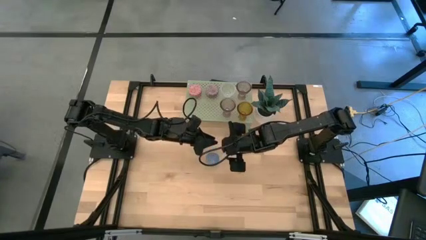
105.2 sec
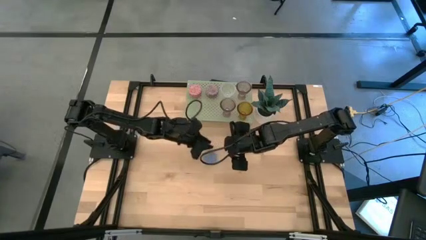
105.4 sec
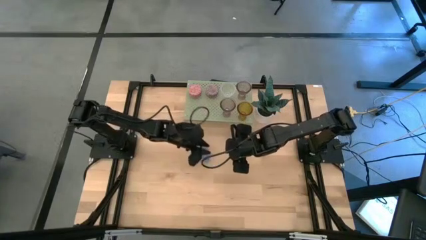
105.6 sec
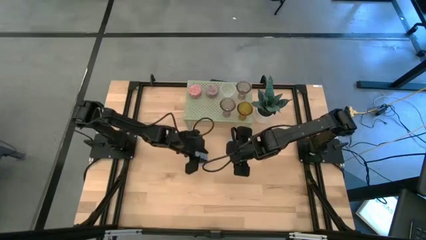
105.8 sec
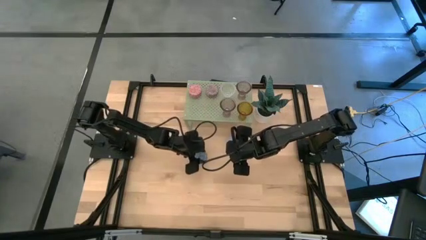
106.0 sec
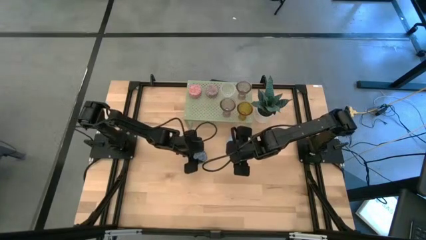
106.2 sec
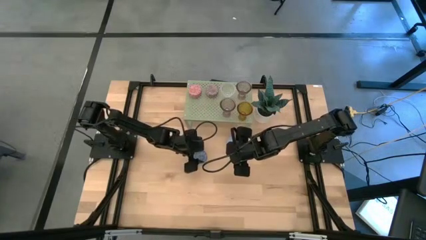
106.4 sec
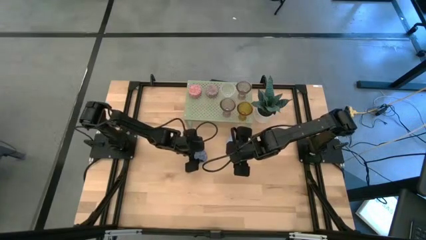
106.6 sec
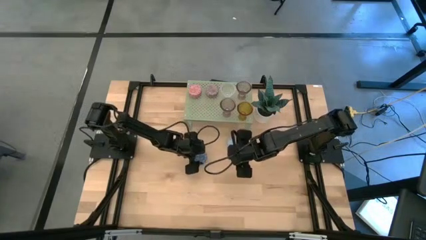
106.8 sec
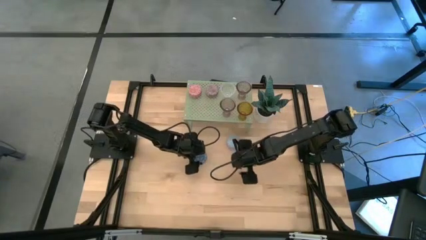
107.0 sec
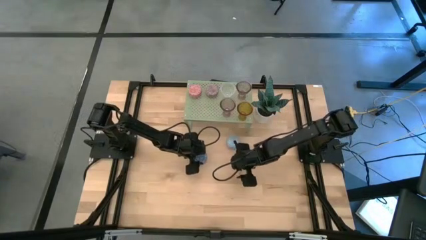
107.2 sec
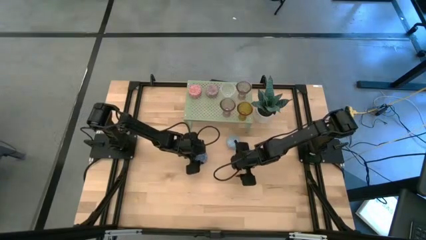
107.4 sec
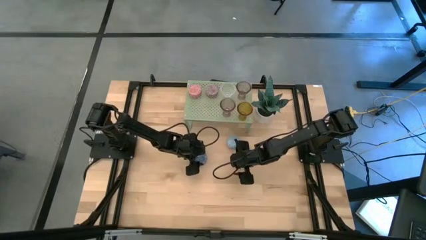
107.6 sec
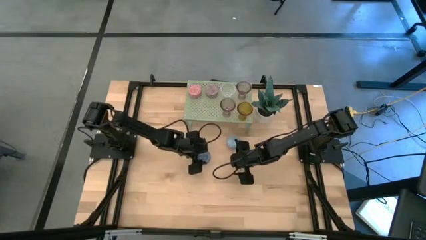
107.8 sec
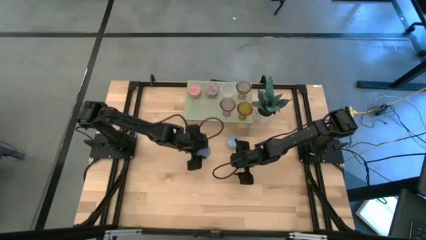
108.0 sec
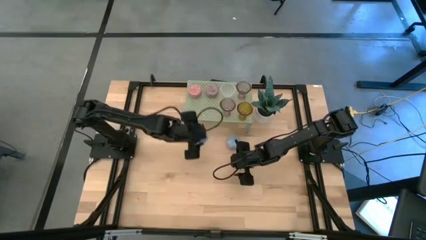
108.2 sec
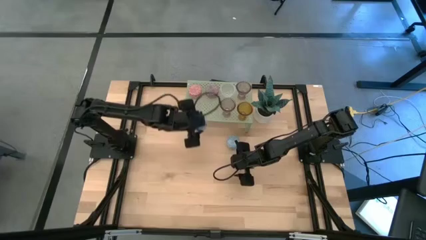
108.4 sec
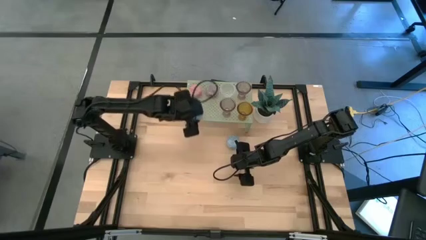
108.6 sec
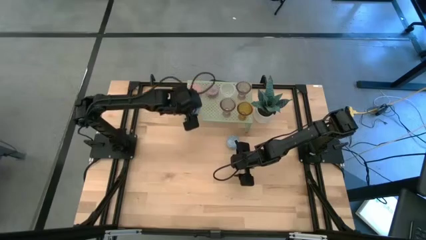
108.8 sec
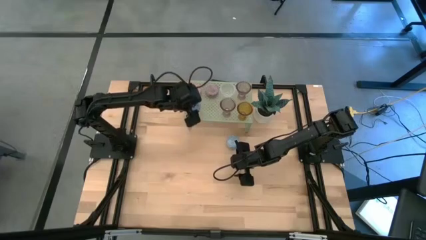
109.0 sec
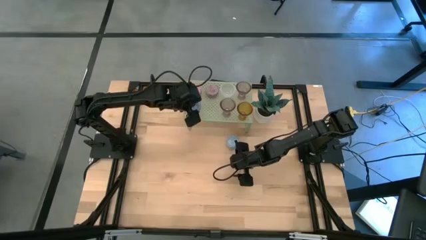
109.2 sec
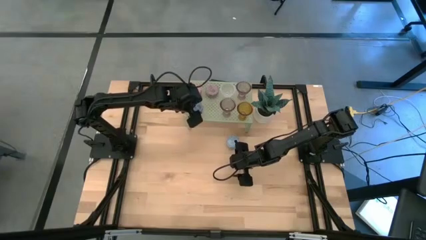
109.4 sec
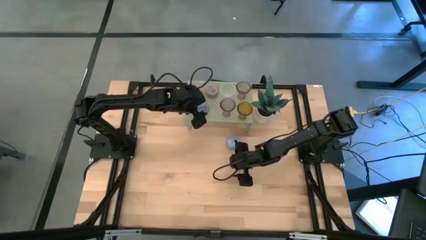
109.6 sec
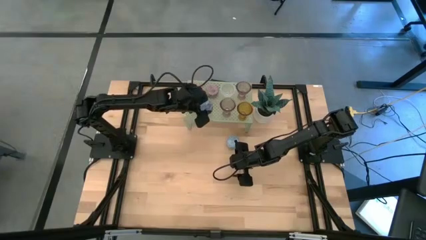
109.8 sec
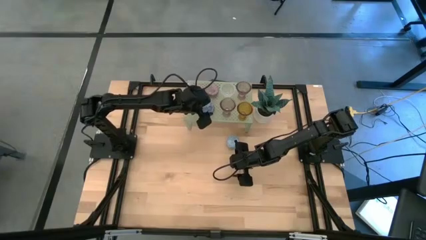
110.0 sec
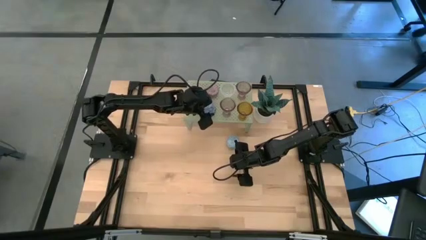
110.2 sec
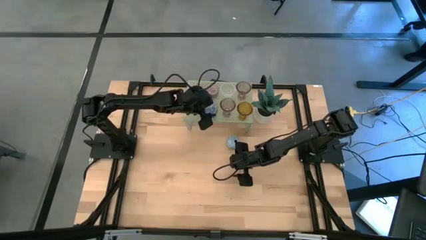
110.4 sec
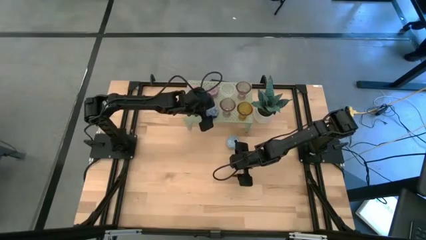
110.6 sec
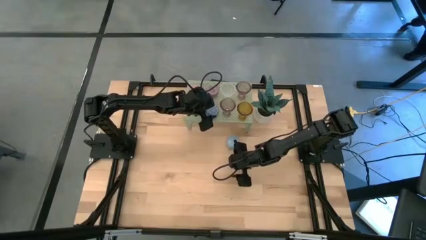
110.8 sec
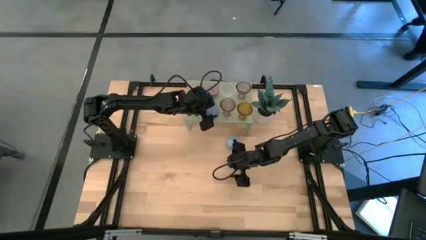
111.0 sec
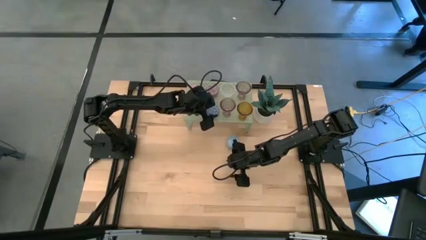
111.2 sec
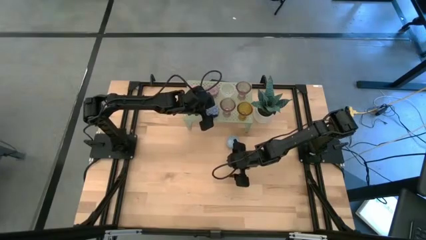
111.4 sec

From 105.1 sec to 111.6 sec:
Task: Pick & Place candle stick holders
Align the blue scented candle with the purple scented candle on the shelf

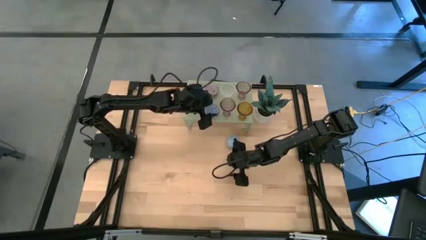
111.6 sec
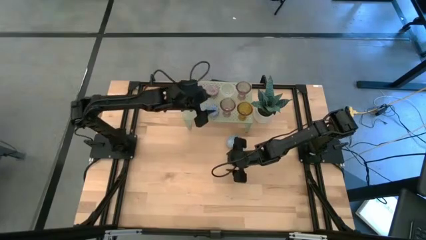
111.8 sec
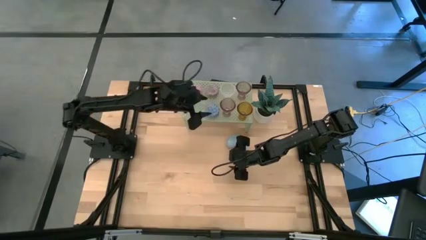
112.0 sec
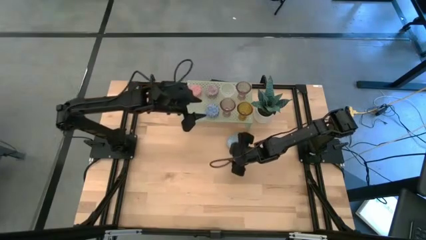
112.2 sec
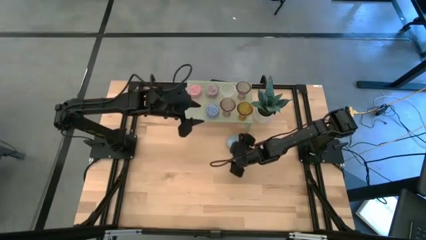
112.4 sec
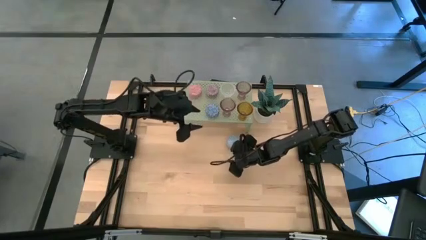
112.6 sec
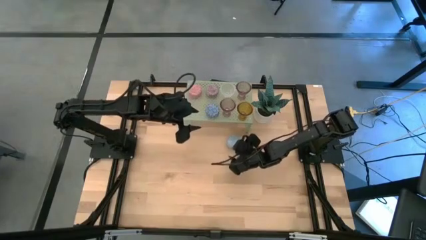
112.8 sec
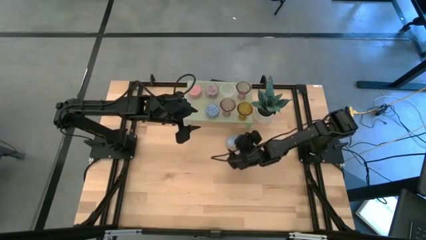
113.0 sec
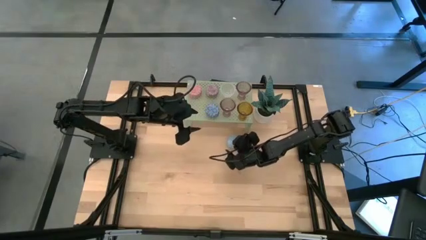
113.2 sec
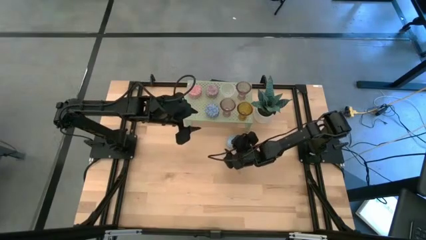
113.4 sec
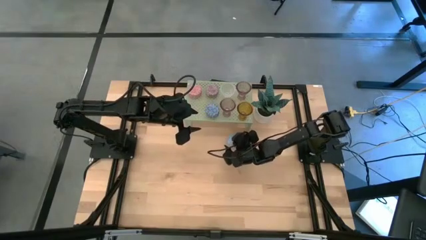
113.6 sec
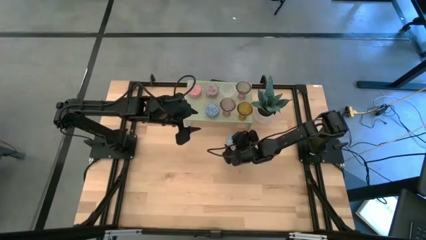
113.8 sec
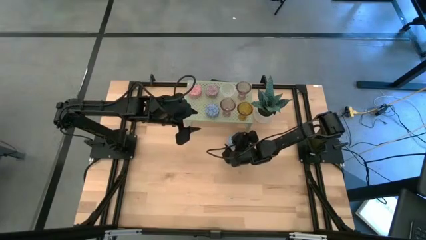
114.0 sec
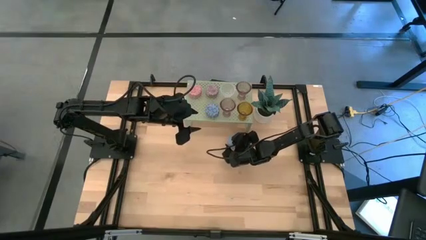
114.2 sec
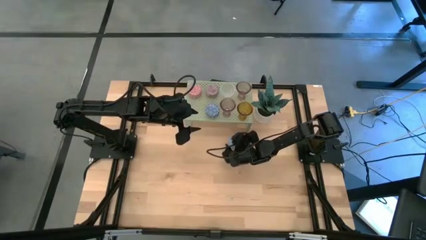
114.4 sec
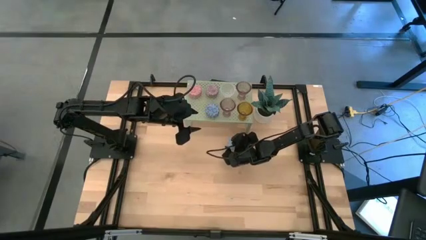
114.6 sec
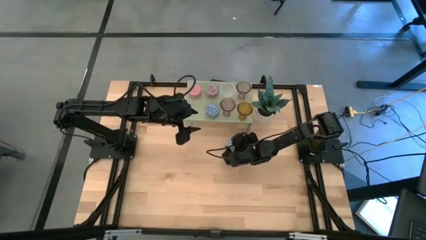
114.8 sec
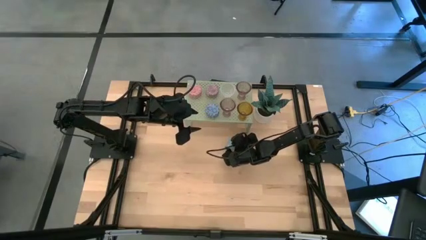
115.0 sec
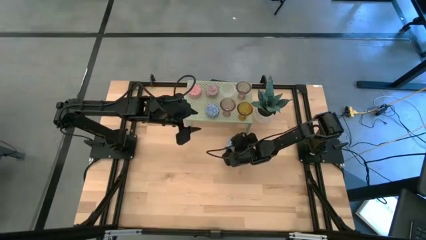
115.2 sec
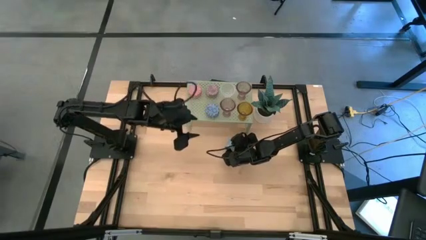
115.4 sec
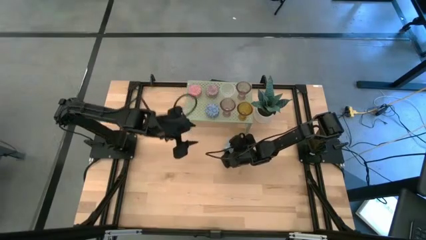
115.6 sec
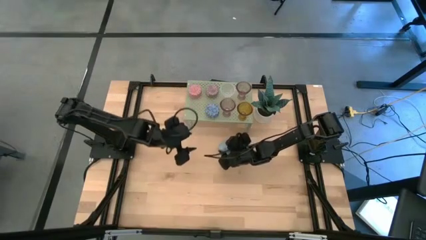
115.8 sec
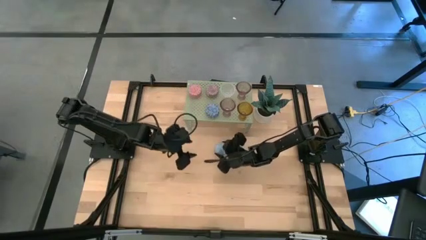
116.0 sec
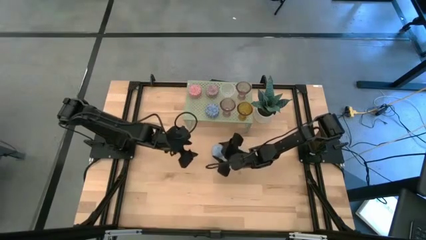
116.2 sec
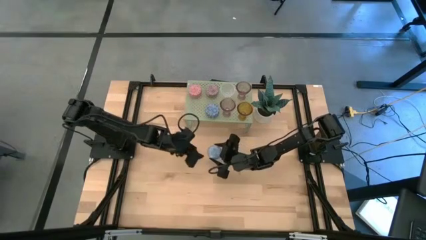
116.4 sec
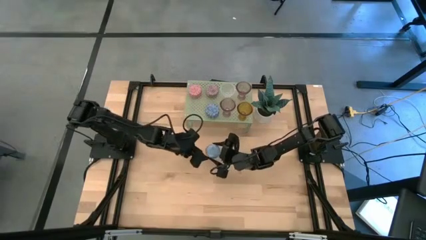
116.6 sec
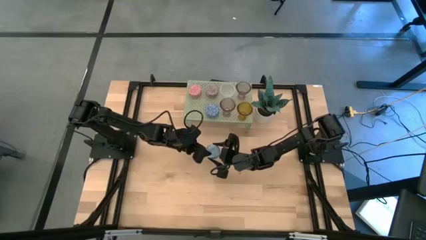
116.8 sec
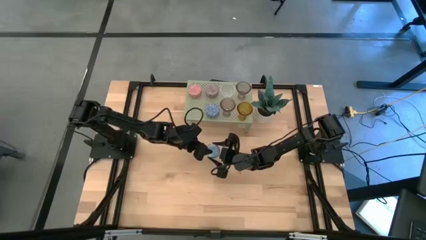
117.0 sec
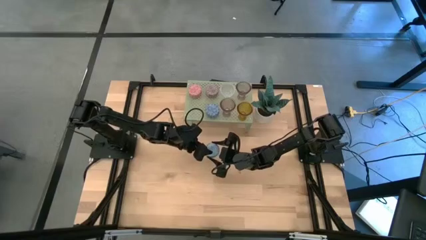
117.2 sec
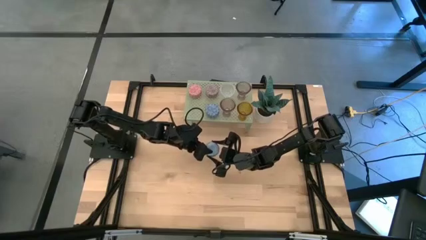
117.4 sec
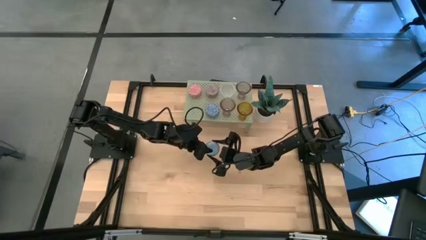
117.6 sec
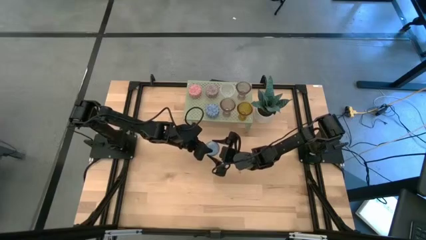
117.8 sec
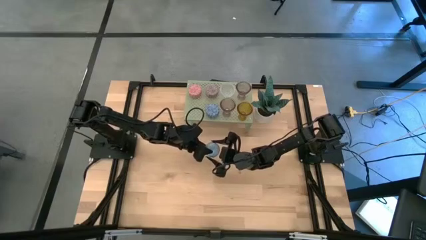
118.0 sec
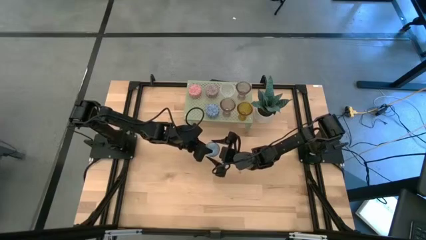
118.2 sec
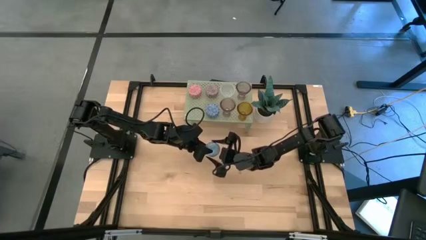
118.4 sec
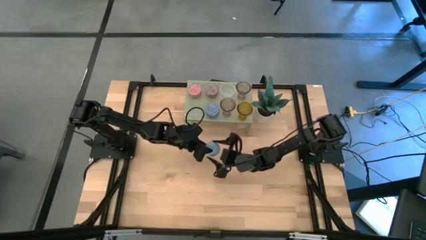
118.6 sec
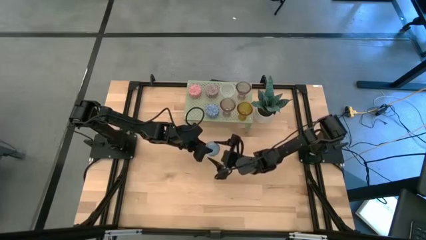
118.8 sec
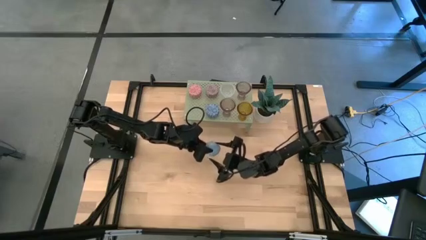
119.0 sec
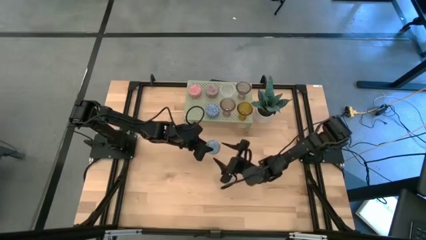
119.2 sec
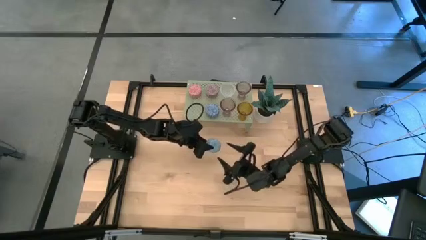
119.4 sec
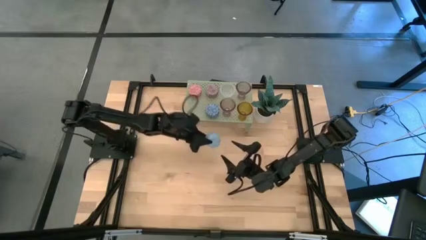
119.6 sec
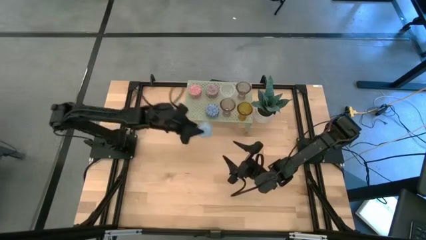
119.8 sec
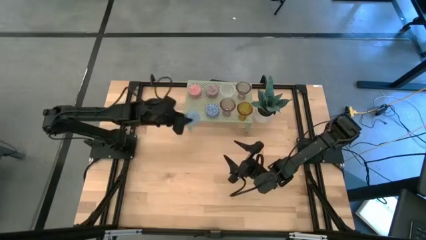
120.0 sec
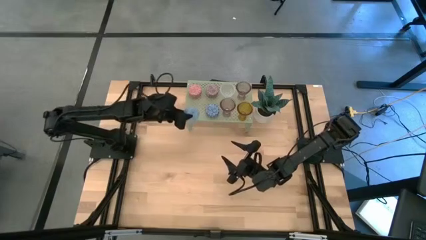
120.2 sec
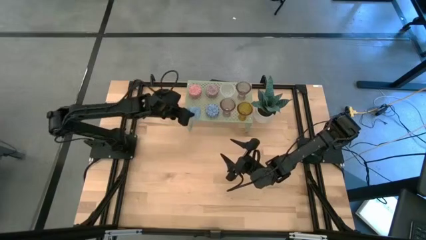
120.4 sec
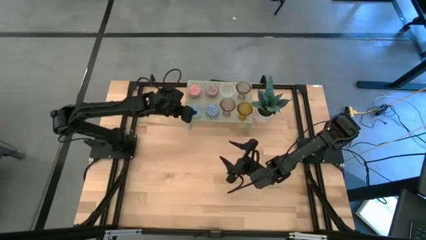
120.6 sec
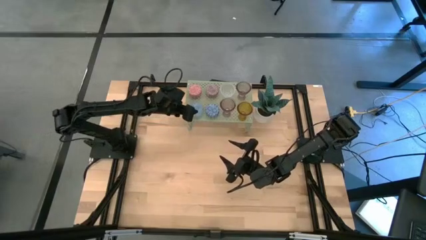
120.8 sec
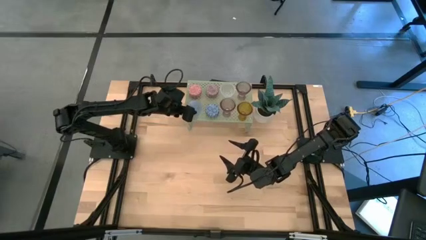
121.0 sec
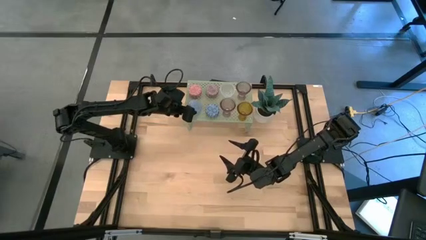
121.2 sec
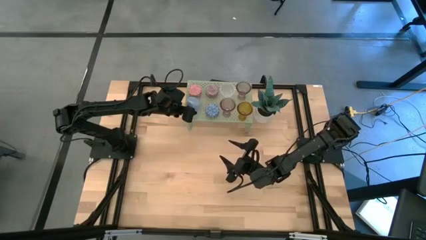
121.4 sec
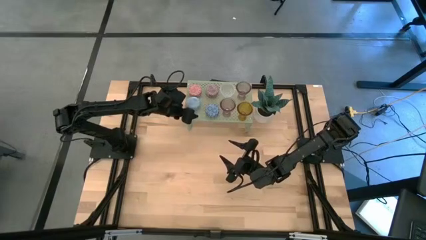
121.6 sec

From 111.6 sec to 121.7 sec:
Align the light blue scented candle with the red scented candle on the shelf

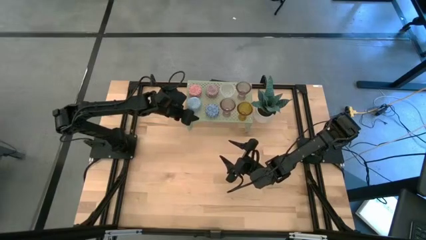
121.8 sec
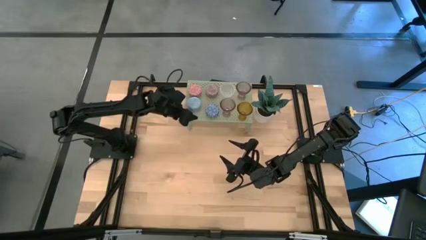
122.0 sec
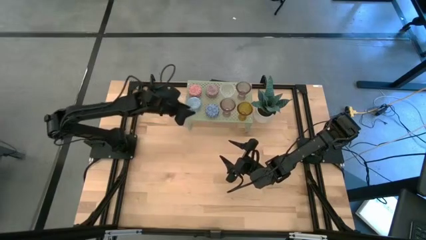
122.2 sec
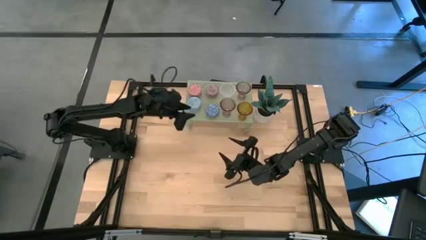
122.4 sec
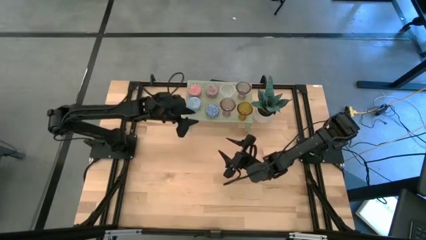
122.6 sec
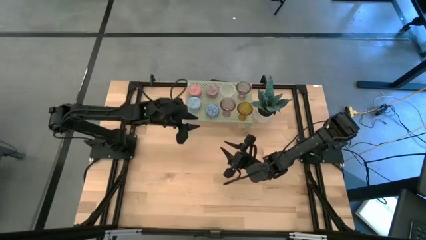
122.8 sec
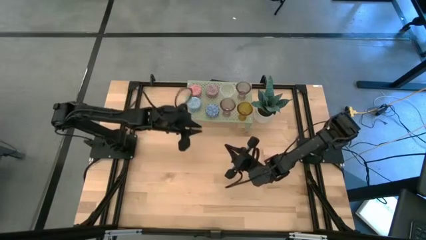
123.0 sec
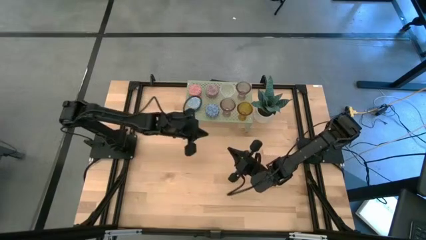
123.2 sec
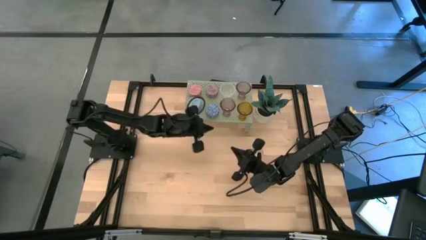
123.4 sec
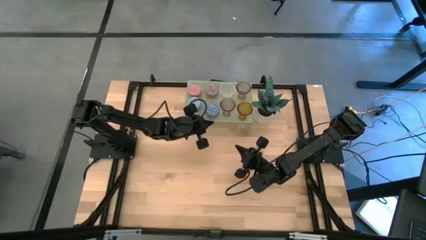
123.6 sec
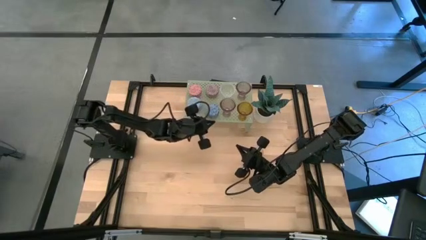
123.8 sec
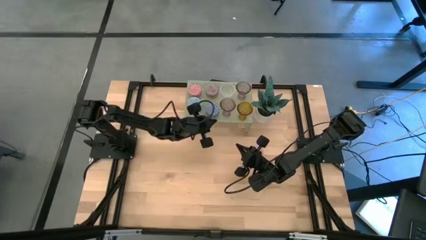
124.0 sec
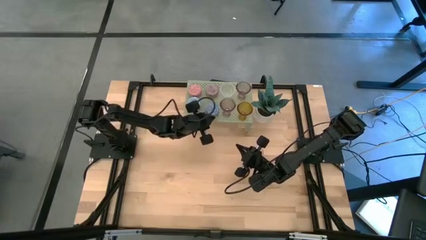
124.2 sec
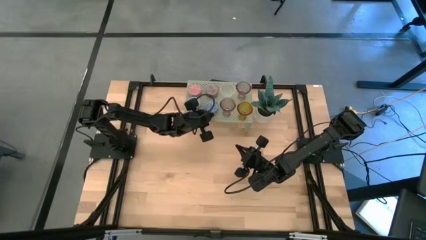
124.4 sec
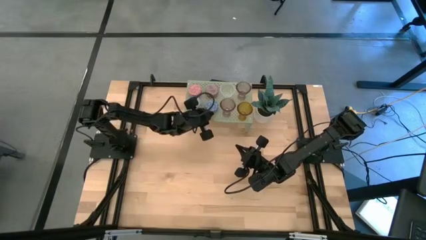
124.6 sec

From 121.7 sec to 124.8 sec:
Adjust the blue scented candle on the shelf
